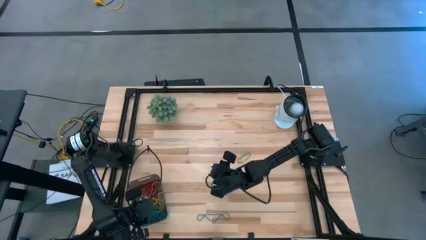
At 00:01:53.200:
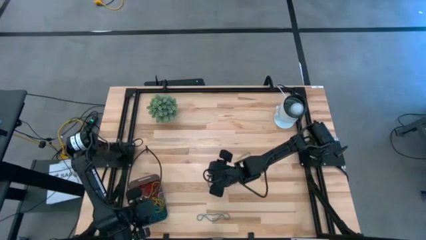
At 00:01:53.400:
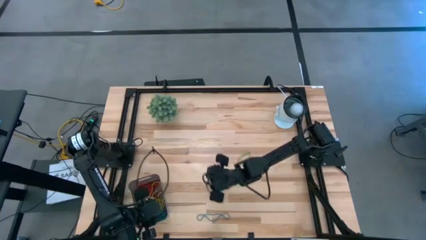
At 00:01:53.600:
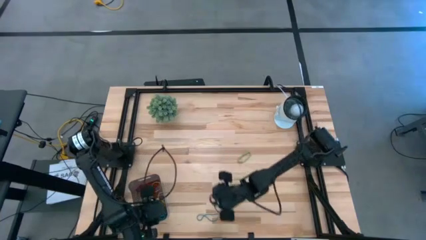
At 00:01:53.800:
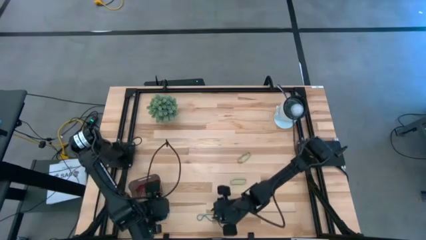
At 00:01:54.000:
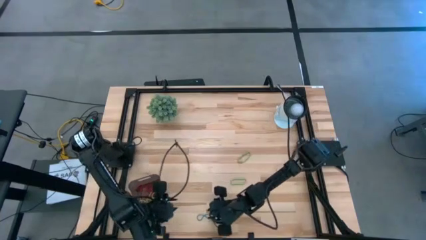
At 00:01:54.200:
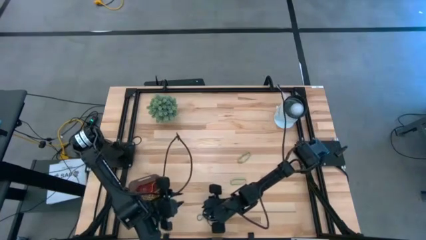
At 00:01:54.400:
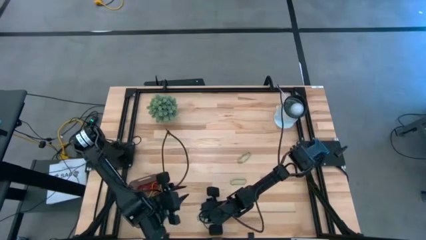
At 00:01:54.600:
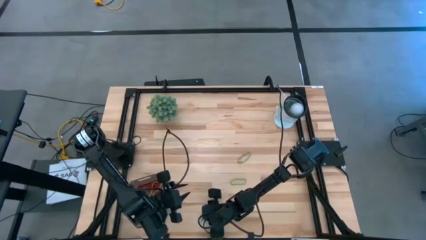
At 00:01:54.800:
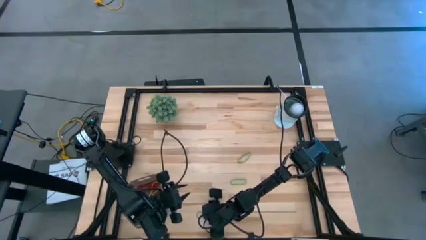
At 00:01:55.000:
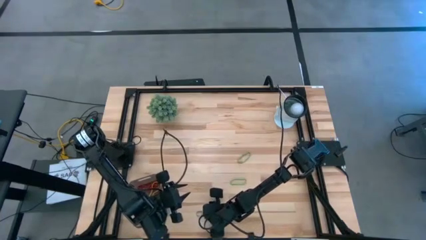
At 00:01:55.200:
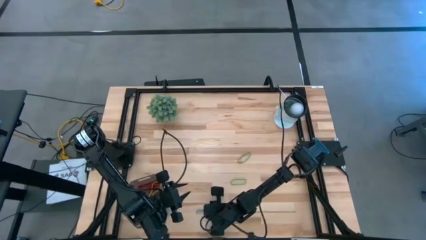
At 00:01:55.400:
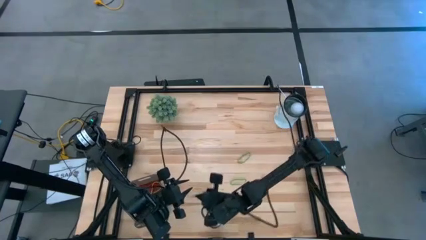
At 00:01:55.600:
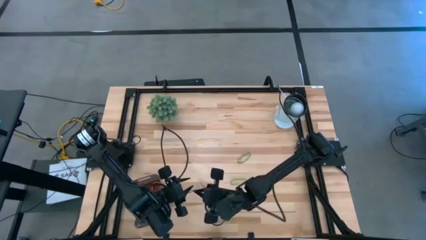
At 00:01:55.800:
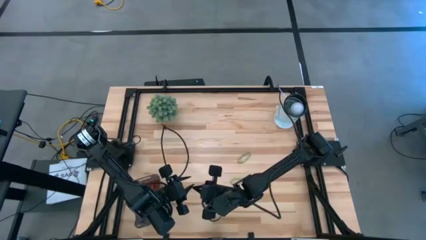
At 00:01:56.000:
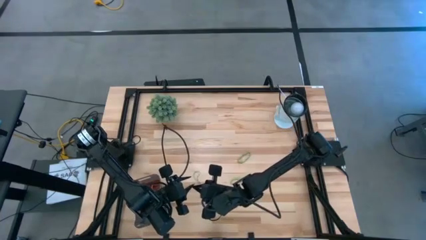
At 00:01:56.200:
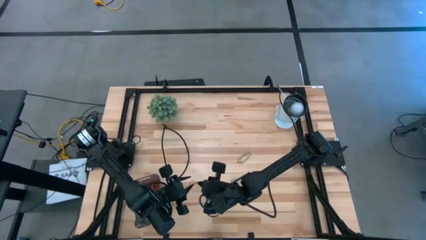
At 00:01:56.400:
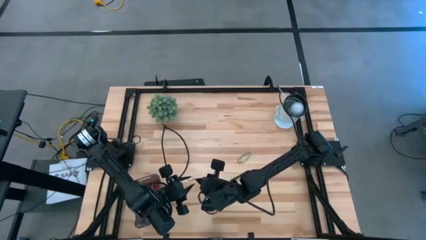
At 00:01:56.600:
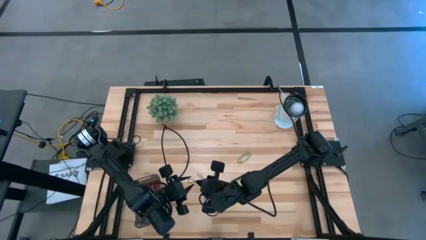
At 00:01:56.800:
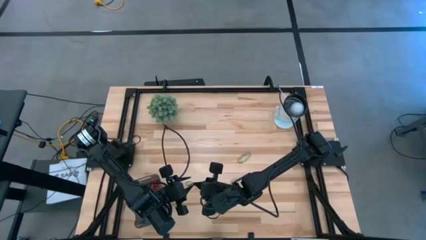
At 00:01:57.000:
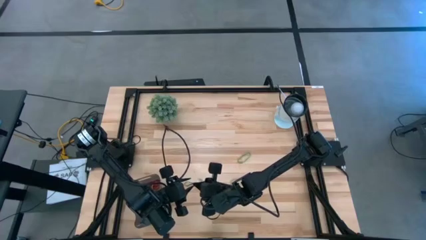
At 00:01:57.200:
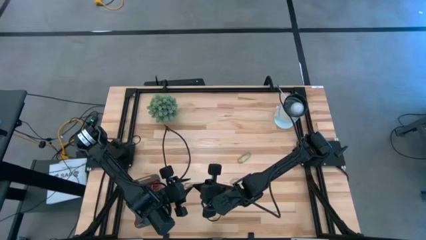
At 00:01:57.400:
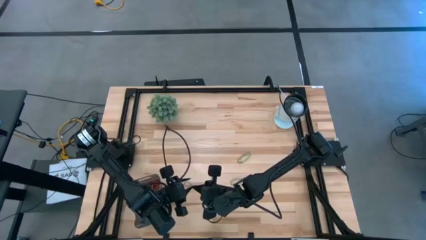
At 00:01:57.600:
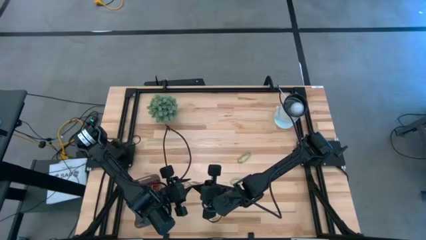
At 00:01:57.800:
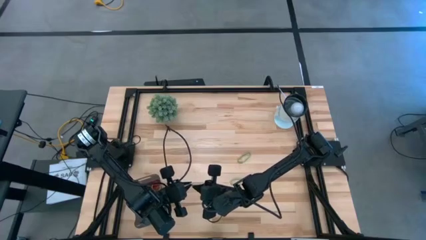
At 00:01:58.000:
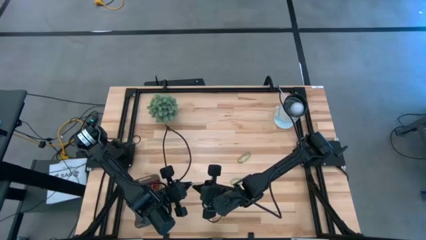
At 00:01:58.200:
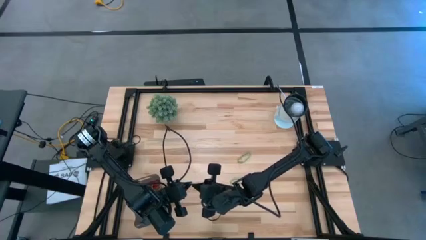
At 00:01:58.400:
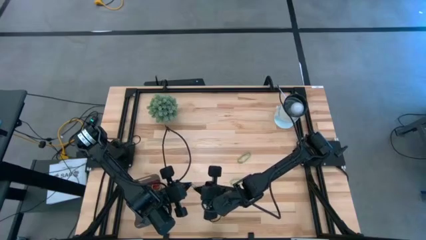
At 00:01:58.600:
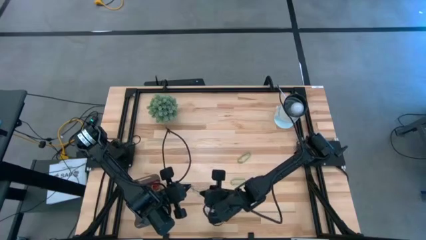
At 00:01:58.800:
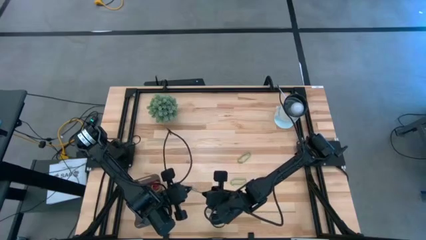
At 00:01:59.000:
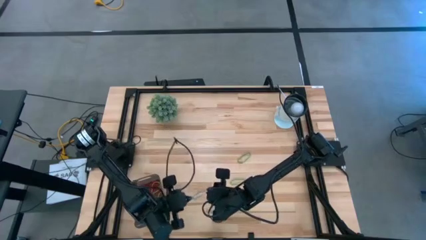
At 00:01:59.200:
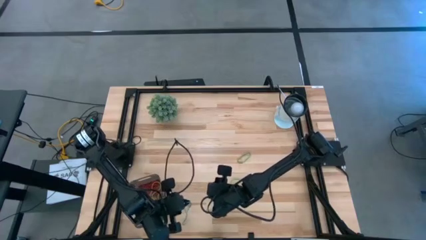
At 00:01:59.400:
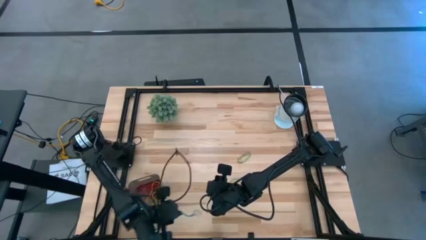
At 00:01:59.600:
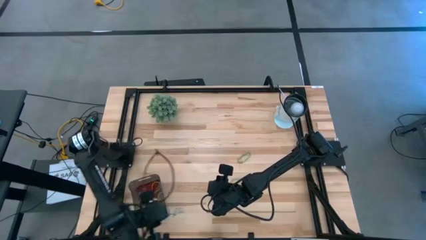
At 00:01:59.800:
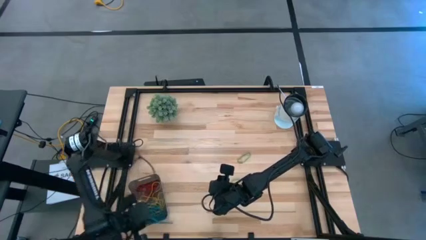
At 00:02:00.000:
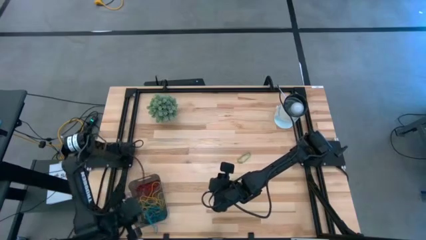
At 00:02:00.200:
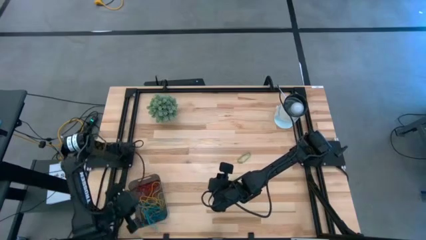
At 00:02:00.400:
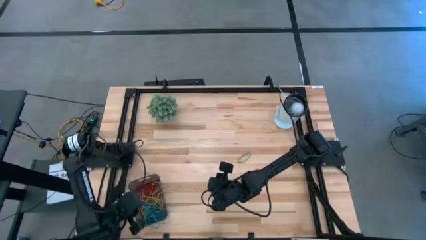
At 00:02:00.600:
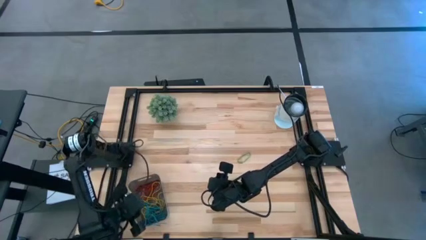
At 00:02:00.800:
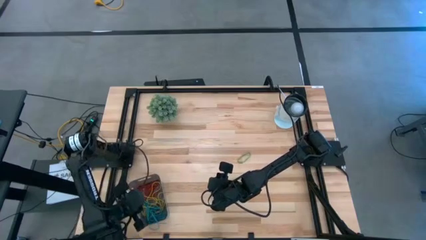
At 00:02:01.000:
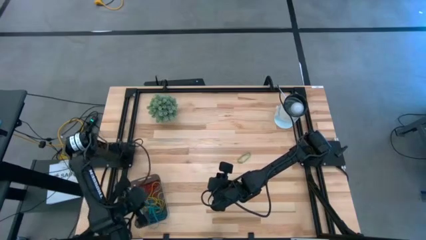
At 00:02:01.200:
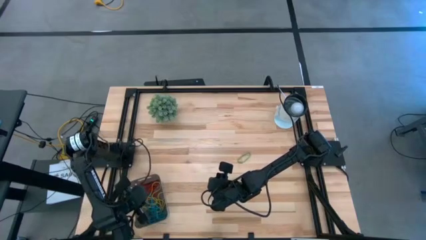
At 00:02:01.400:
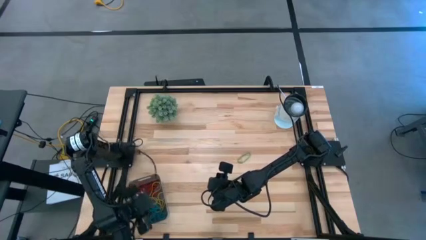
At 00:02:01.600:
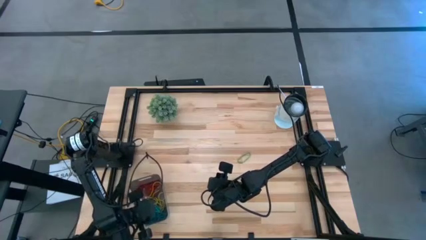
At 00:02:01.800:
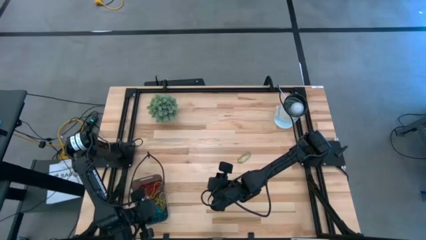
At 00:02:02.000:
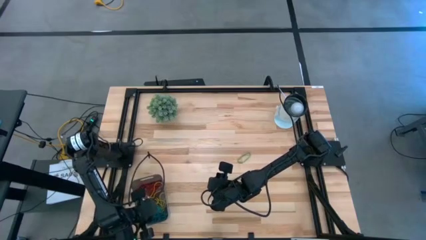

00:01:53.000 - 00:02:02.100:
Task: Pick and place items into bin
Put the blue rubber band into the black bin

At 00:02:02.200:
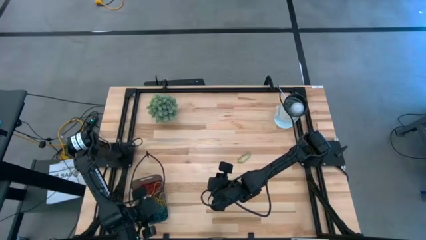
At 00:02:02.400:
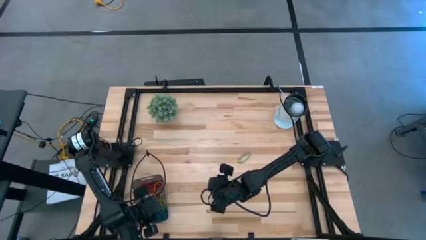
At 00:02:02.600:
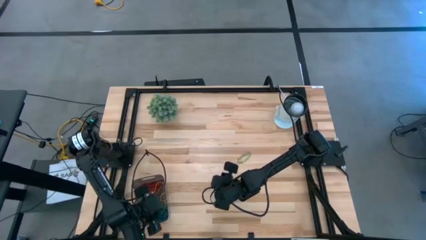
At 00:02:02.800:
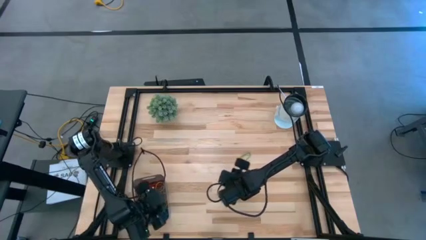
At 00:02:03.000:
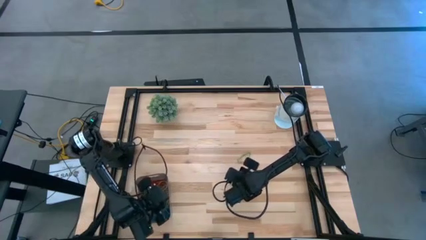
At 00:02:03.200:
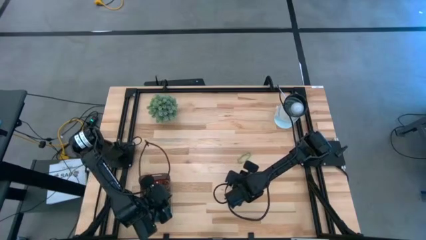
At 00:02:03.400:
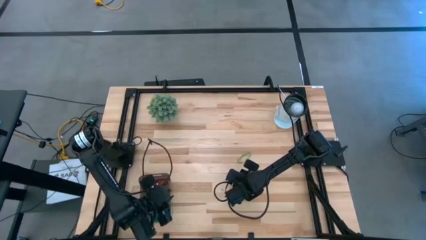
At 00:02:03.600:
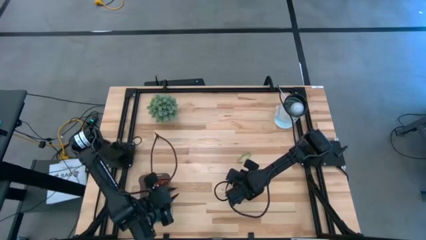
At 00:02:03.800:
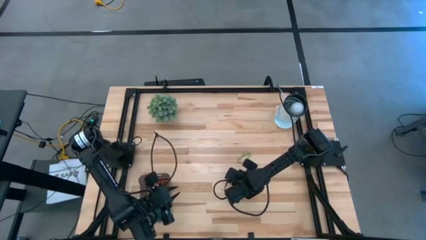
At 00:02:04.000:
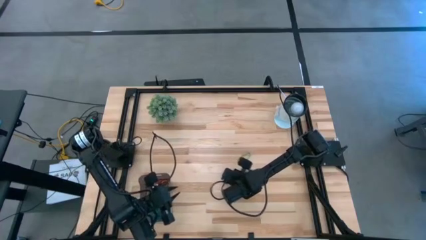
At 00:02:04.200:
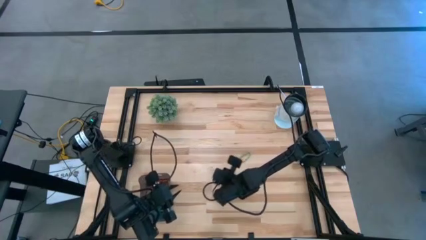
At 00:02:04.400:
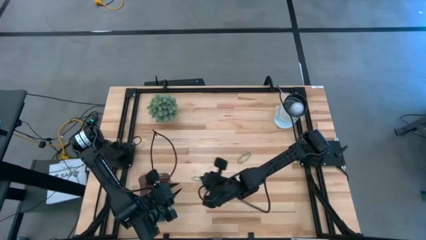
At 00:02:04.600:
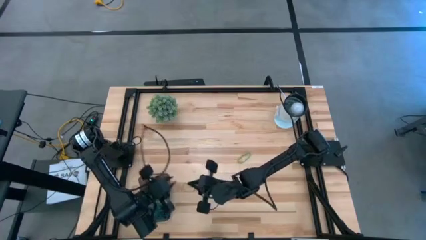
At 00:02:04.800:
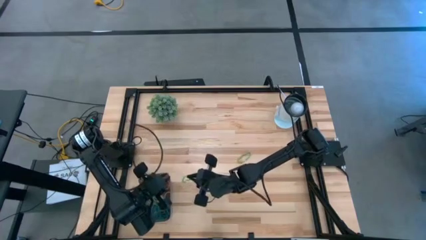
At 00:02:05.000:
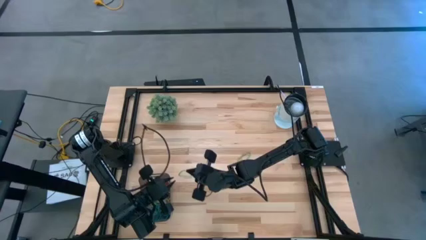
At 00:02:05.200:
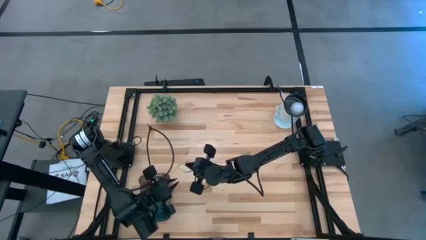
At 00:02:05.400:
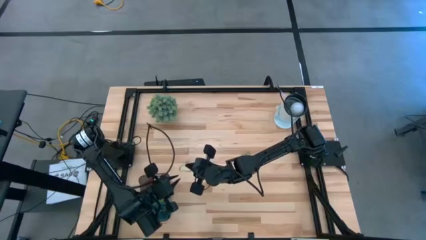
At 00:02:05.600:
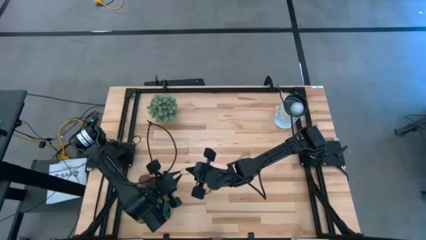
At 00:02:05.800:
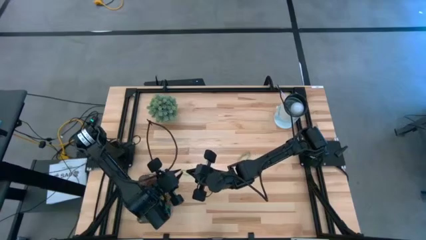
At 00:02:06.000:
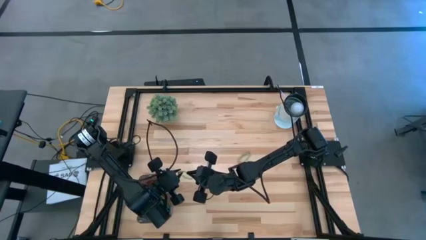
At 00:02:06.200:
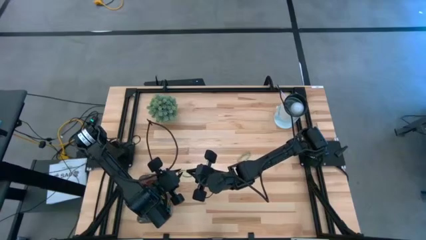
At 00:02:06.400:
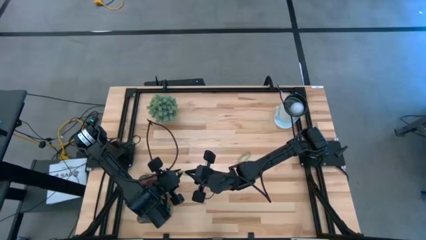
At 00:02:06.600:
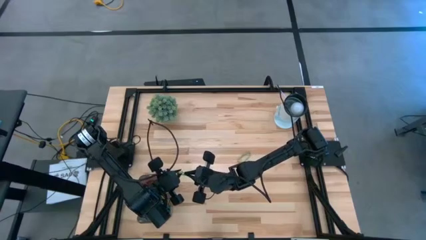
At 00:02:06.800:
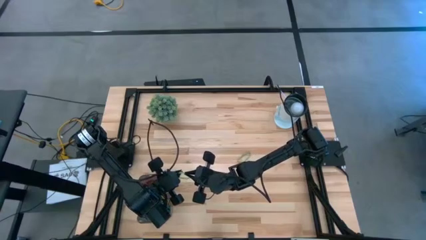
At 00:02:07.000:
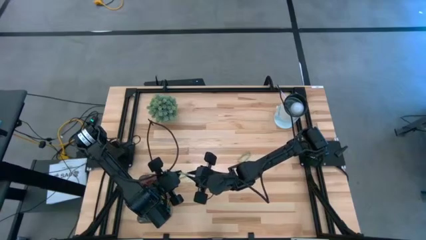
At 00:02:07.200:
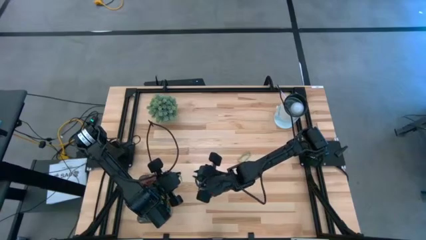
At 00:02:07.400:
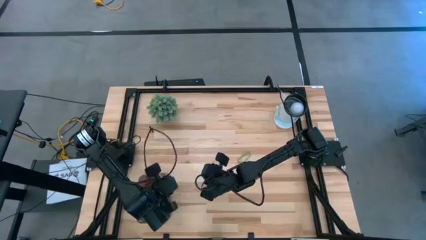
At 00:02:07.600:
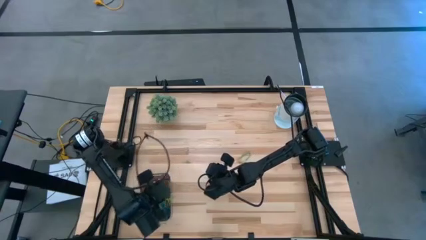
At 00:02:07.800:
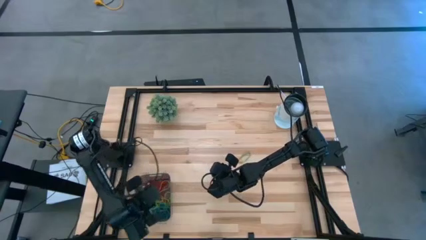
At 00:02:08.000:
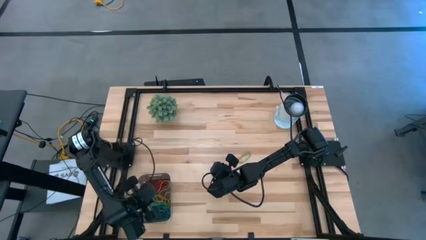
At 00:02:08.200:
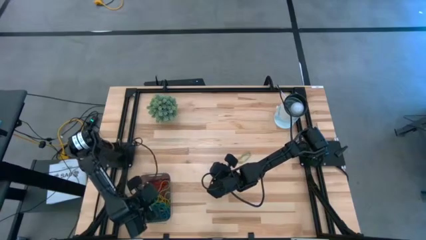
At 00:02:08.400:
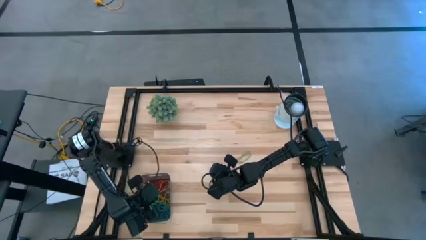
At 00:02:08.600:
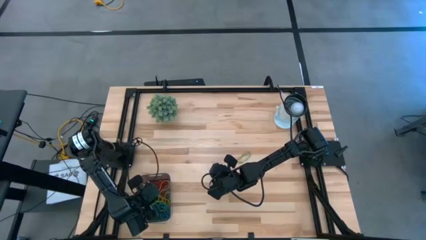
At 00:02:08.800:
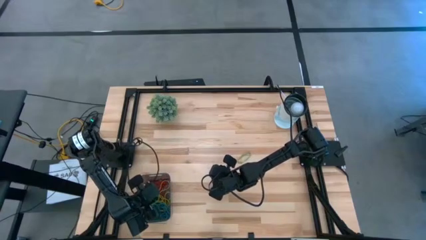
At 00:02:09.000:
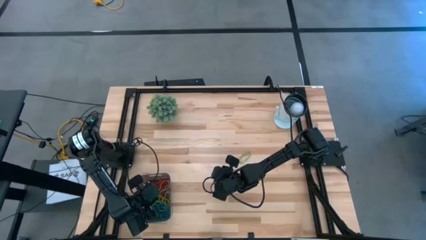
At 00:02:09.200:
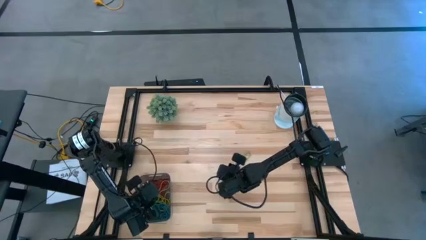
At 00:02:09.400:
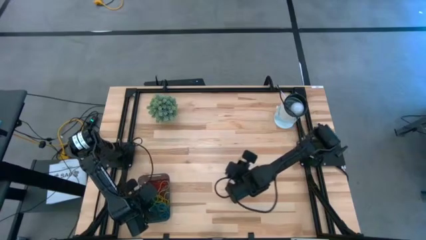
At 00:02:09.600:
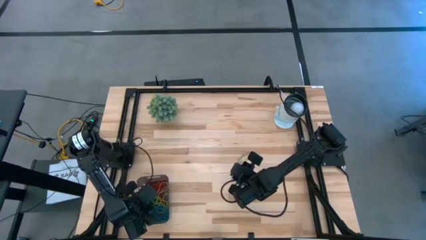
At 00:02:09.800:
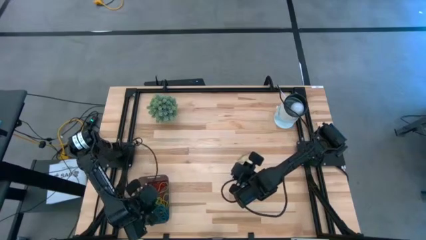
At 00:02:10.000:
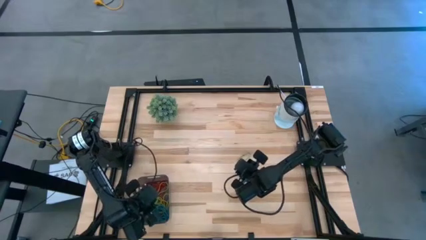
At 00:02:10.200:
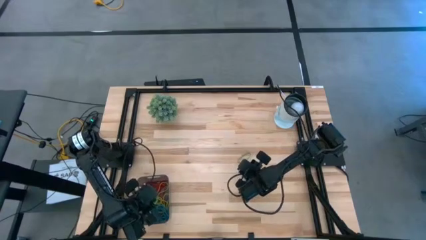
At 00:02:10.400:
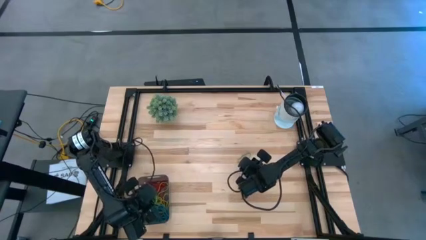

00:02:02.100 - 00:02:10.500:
Put the green rubber band into the black bin
